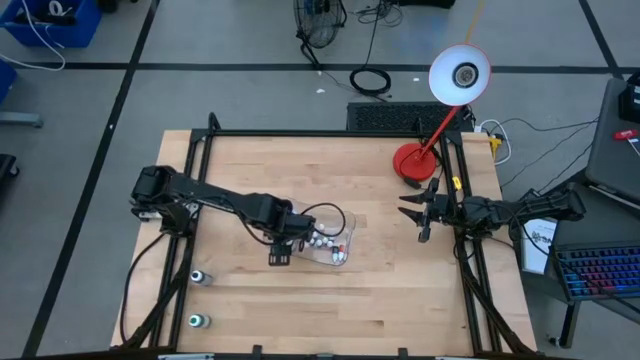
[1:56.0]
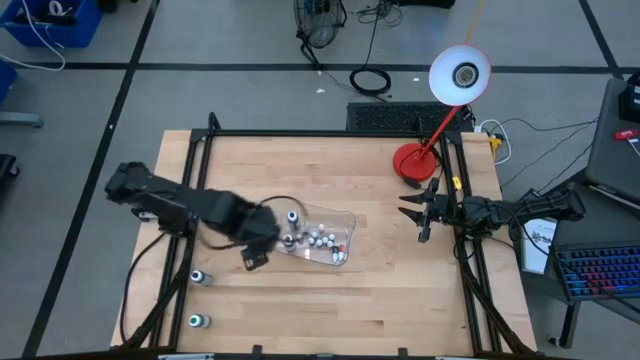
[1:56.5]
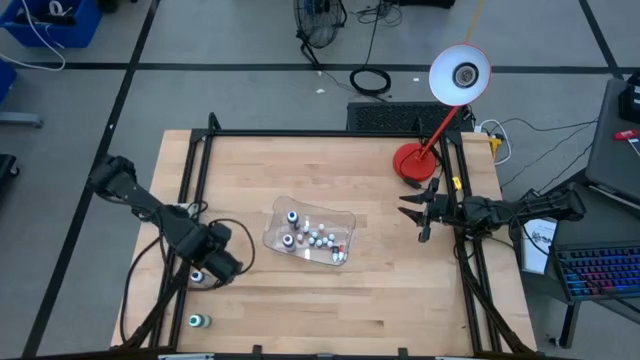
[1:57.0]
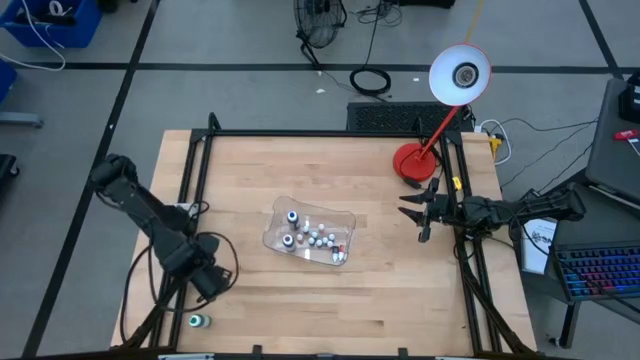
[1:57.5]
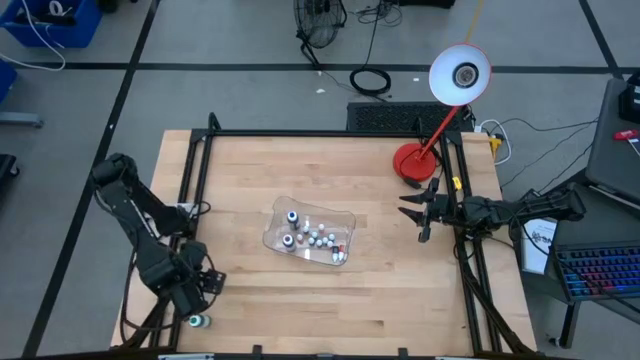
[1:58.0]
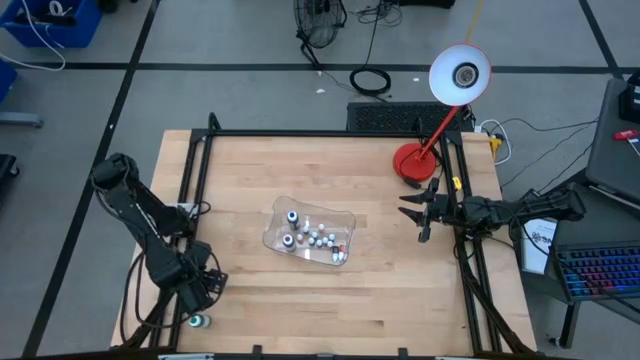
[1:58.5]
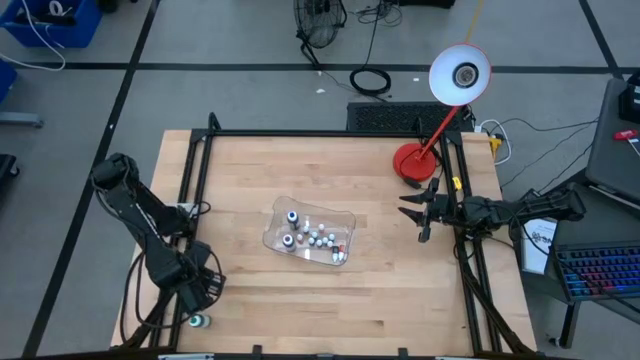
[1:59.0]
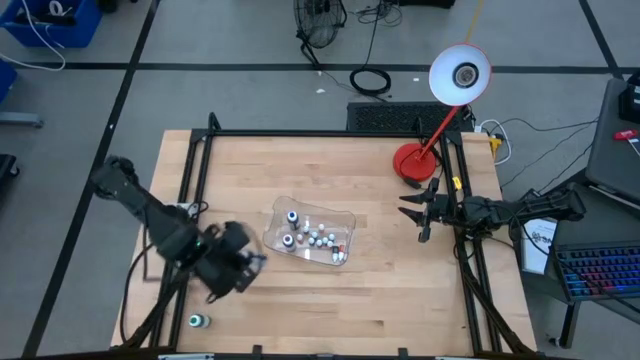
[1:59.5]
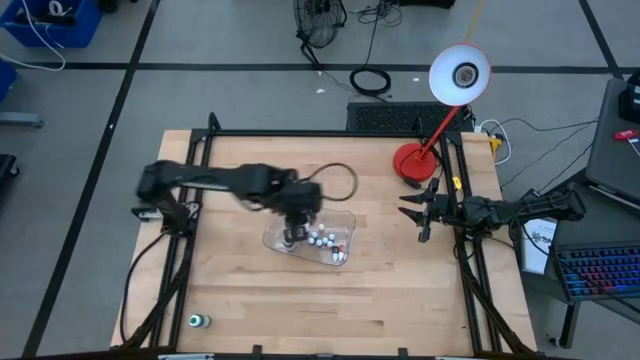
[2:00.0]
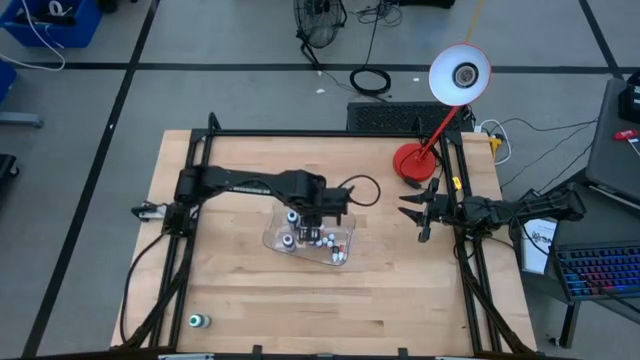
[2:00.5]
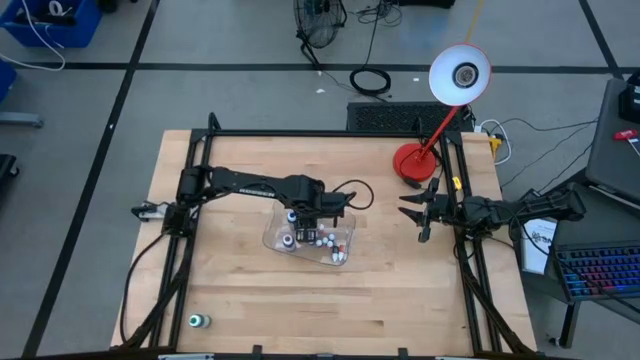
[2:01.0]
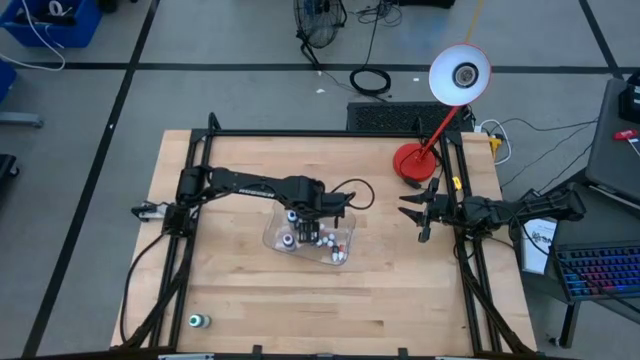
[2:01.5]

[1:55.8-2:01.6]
Task: Pick & Place food coloring
Put the large black food coloring bottle into the transparent bin

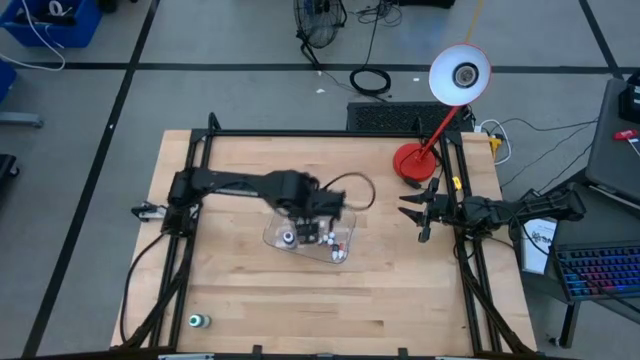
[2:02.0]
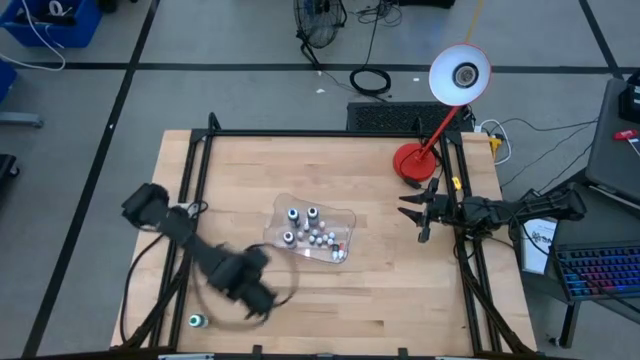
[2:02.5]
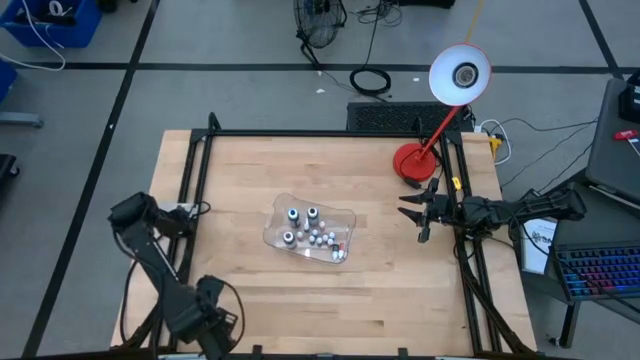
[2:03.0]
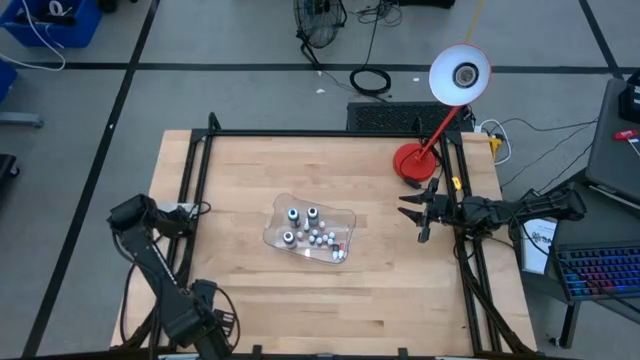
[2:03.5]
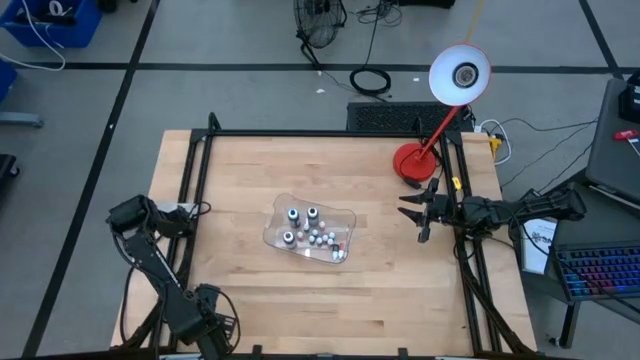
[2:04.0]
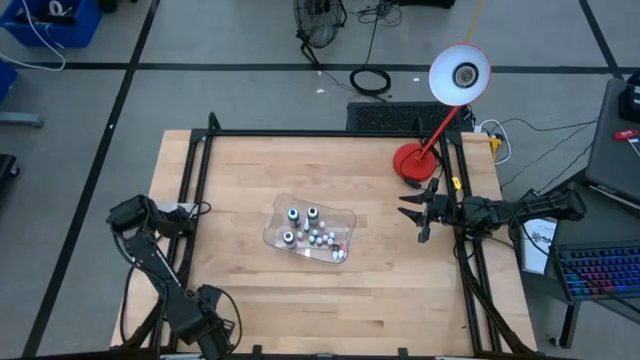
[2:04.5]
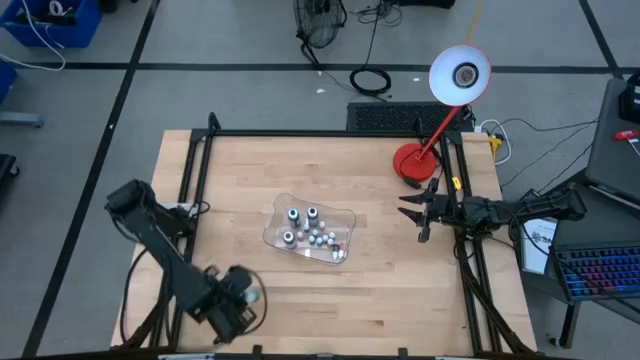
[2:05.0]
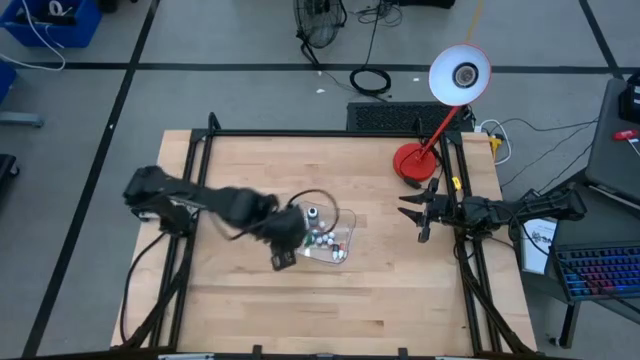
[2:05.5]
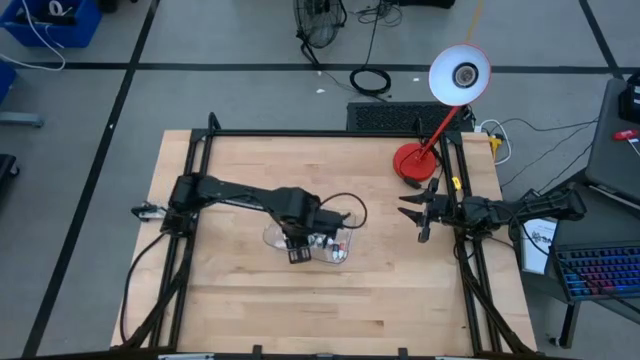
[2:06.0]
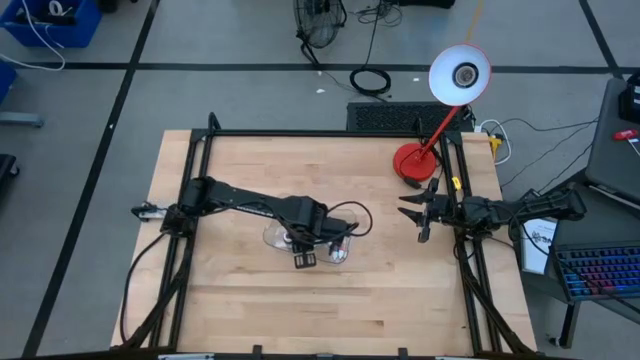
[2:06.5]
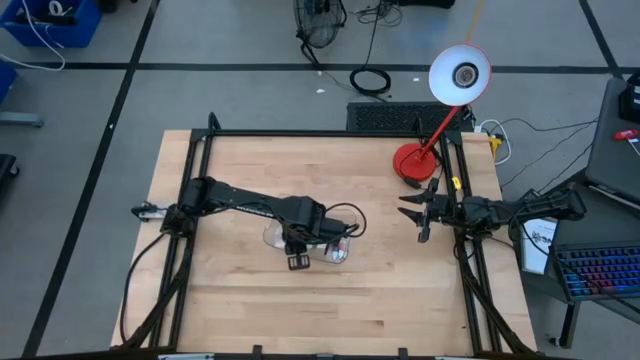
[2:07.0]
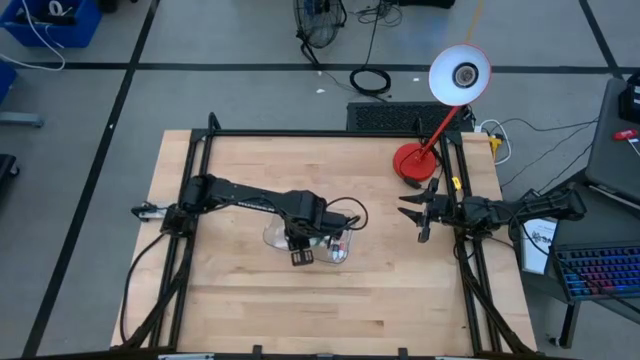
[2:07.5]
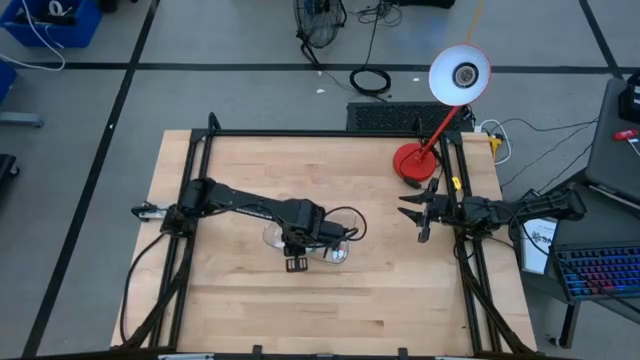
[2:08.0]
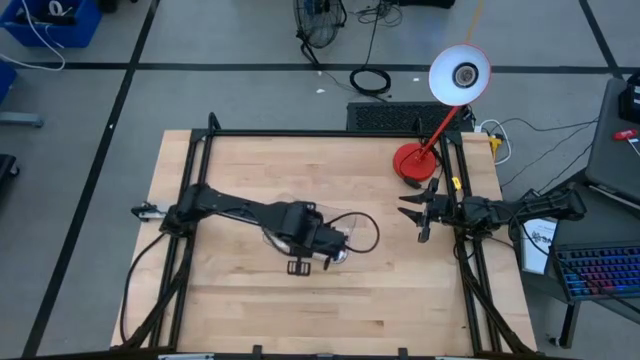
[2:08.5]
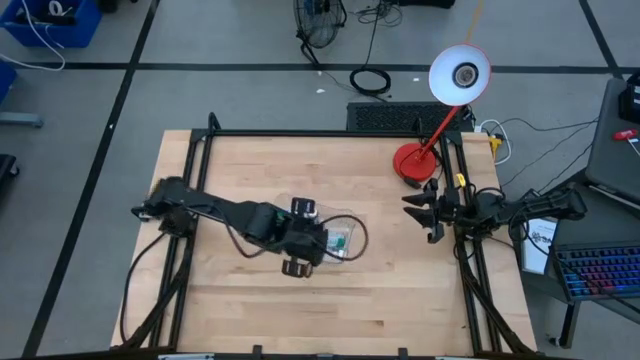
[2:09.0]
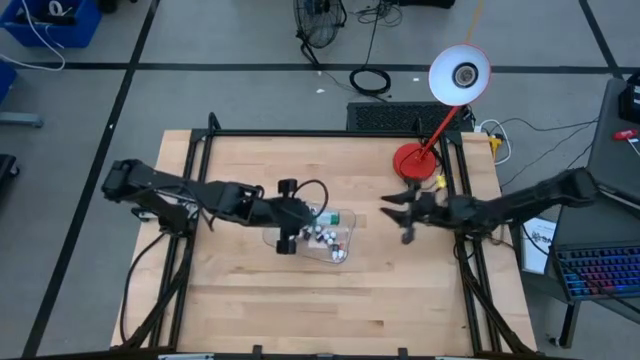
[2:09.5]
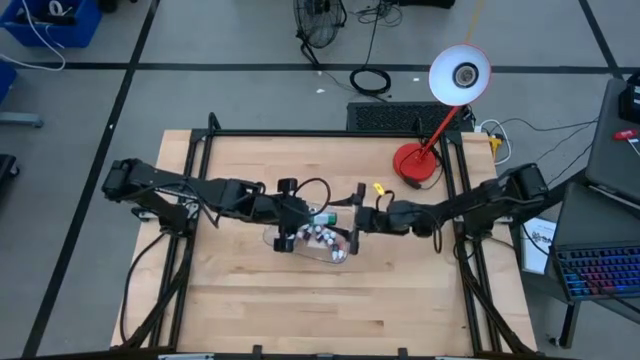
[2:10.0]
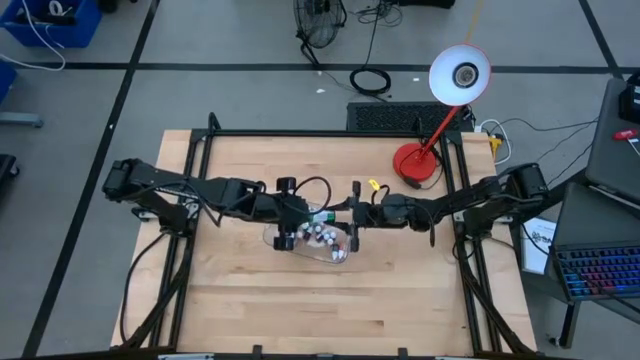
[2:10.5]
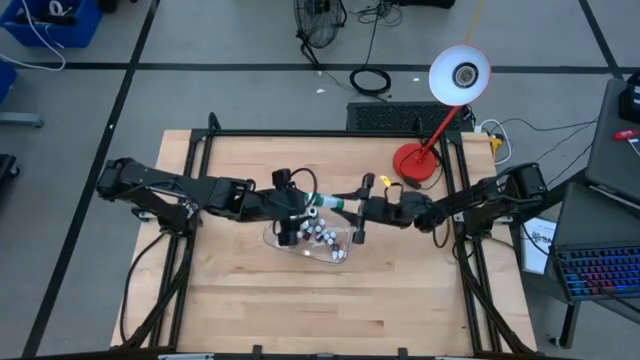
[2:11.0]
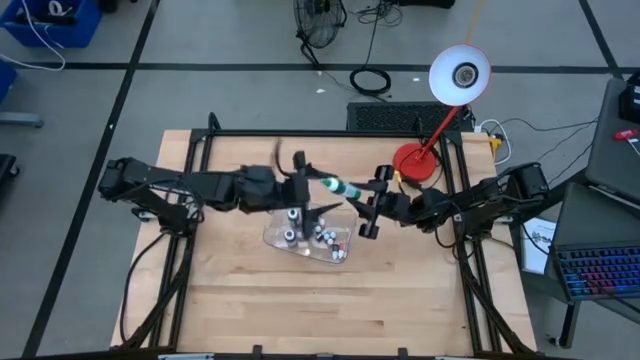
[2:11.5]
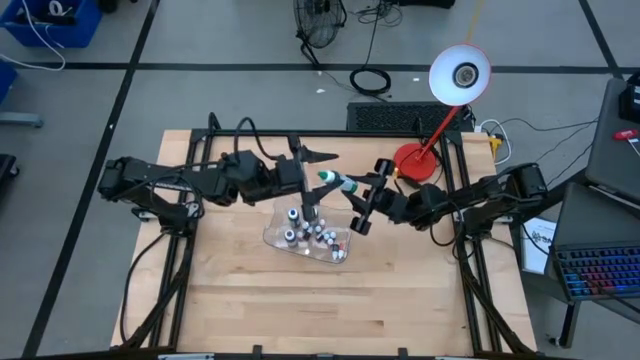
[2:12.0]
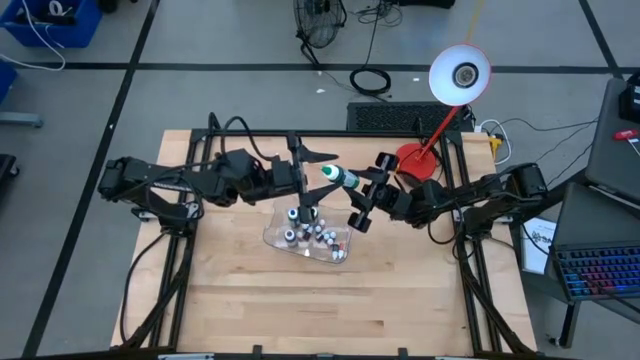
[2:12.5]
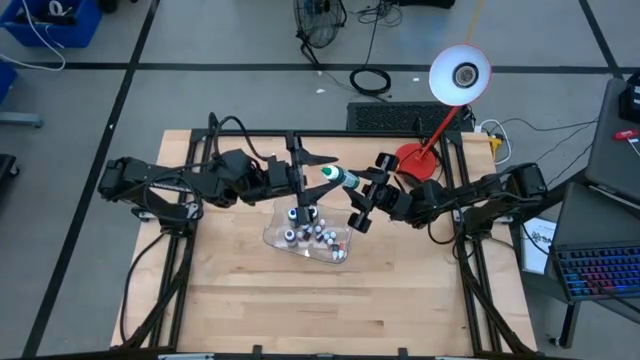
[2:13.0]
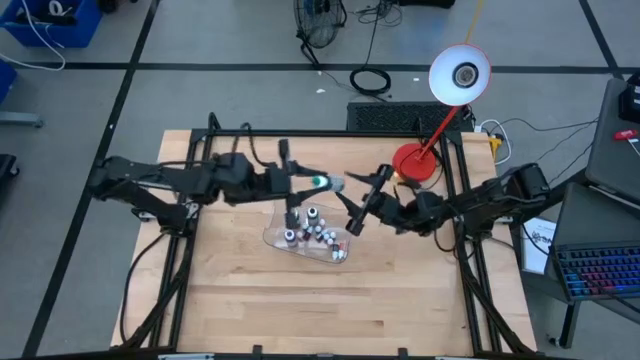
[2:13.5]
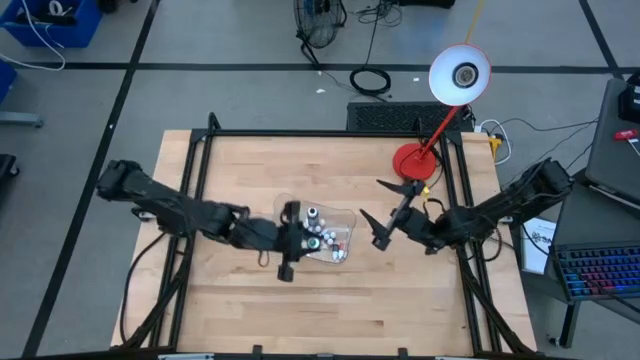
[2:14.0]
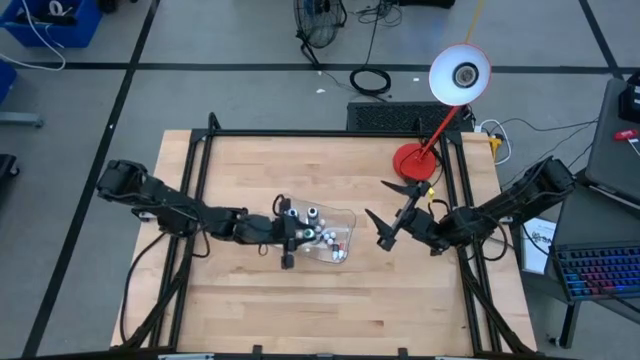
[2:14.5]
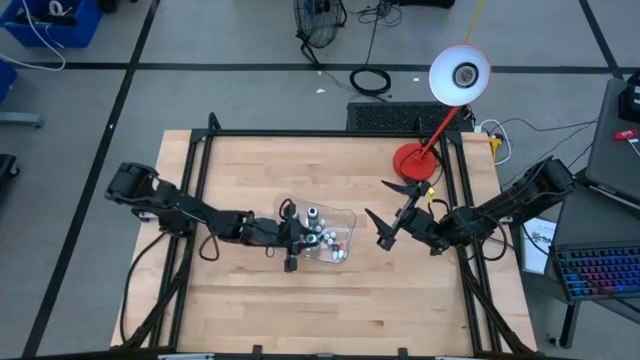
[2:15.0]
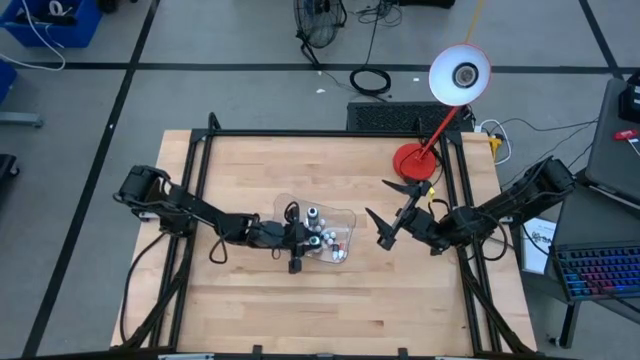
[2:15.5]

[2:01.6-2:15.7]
Put the large green food coloring bottle into the transparent bin
